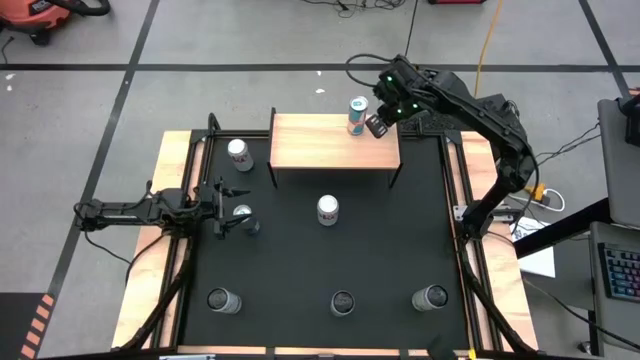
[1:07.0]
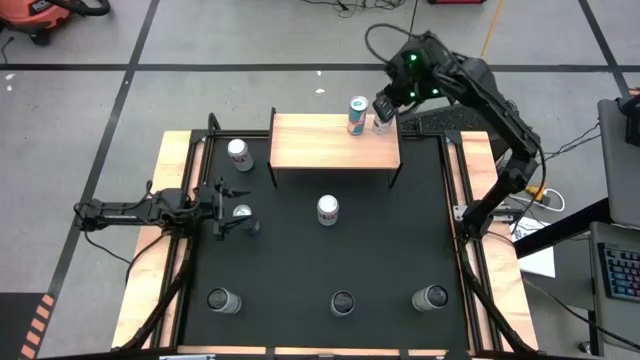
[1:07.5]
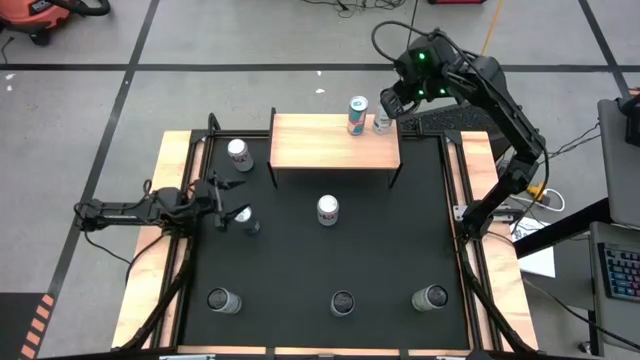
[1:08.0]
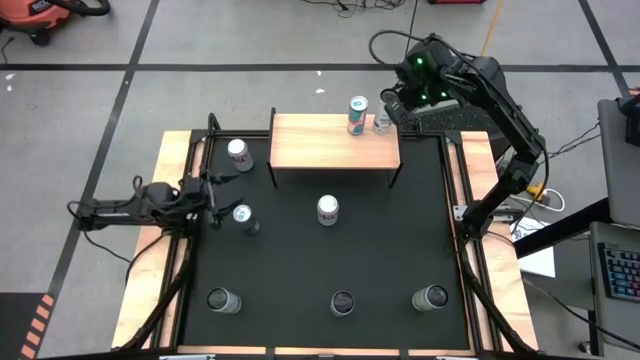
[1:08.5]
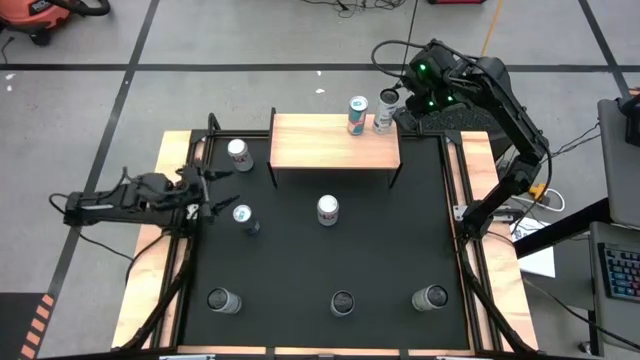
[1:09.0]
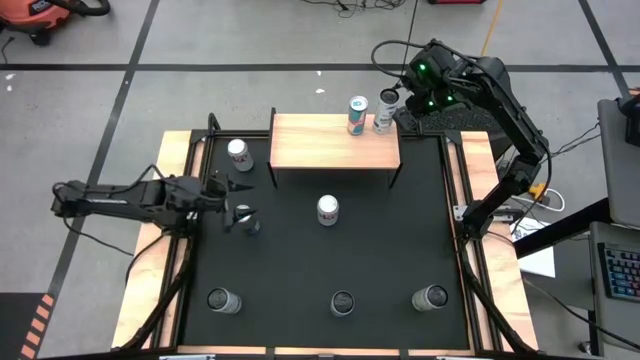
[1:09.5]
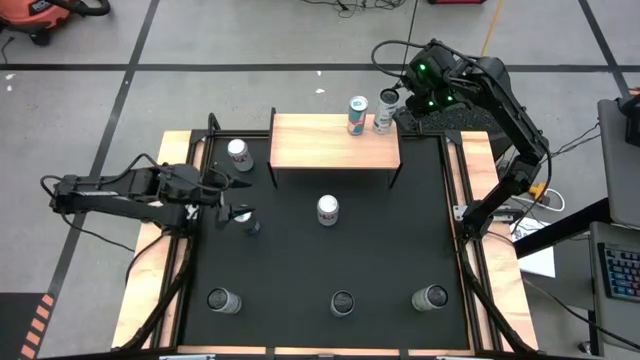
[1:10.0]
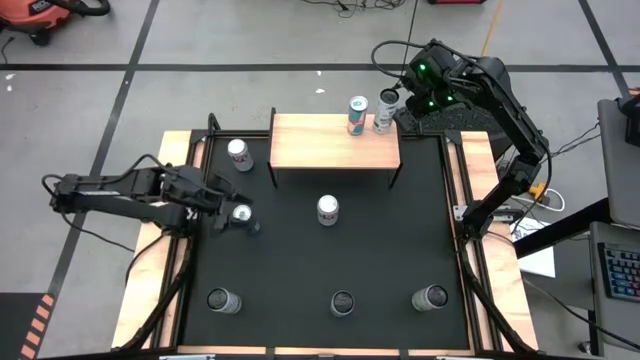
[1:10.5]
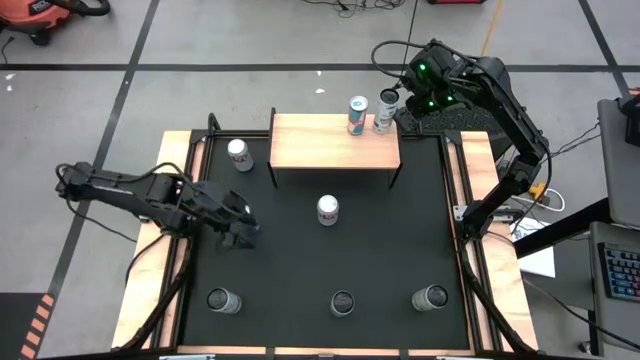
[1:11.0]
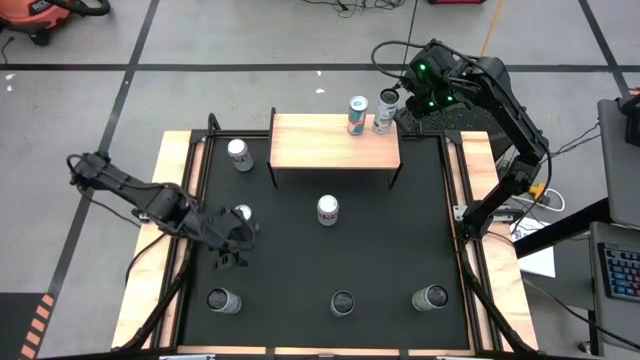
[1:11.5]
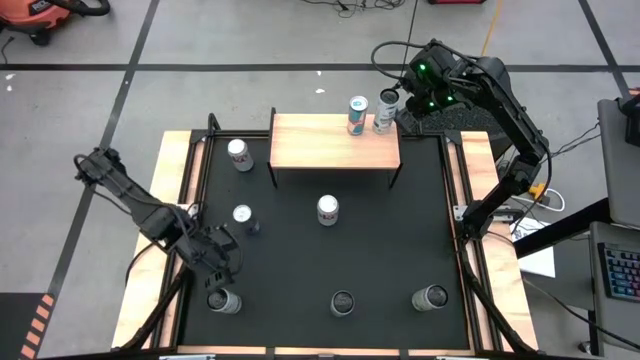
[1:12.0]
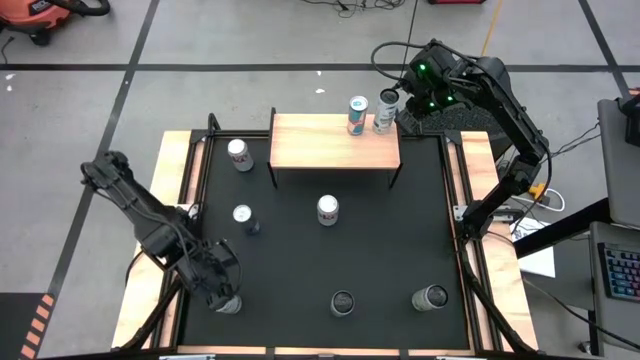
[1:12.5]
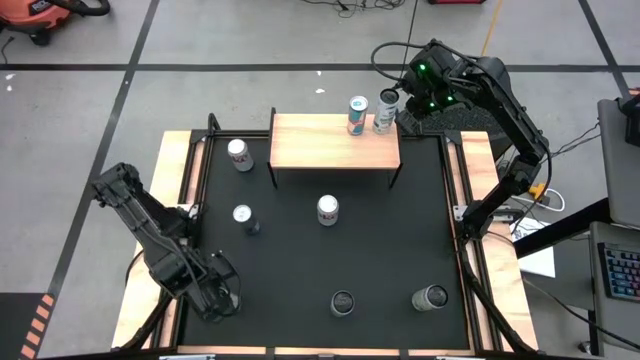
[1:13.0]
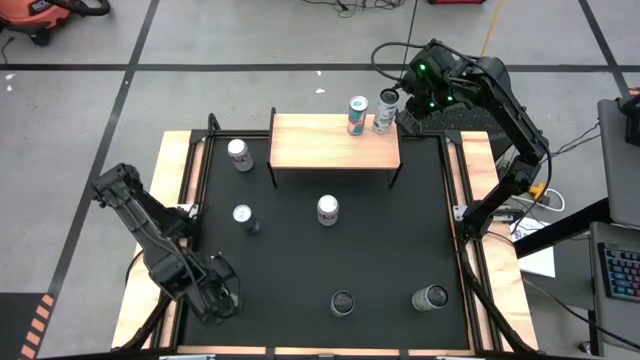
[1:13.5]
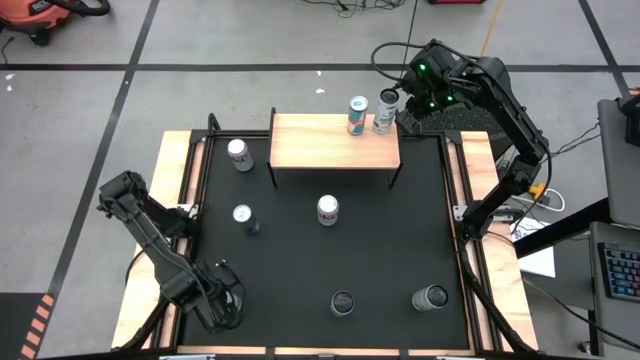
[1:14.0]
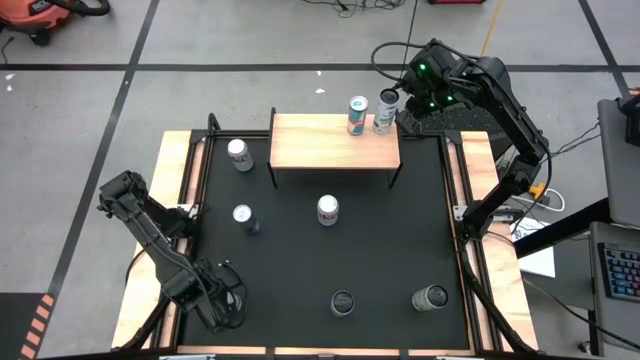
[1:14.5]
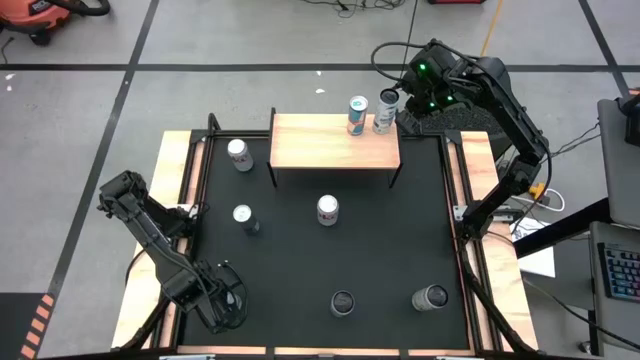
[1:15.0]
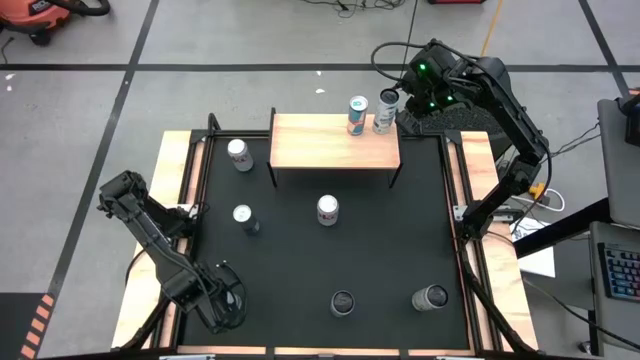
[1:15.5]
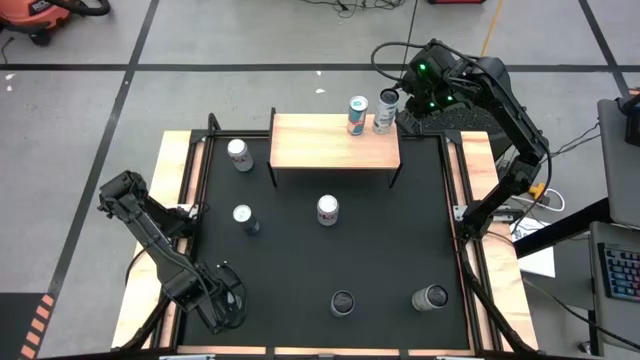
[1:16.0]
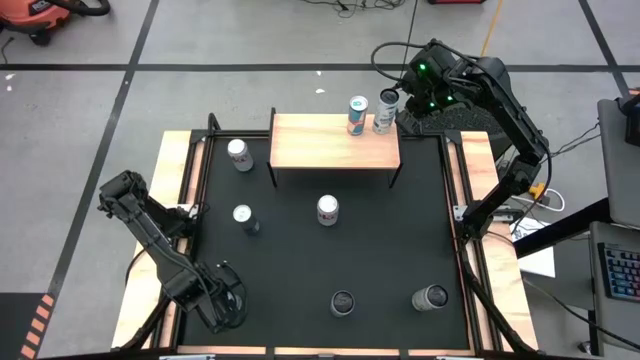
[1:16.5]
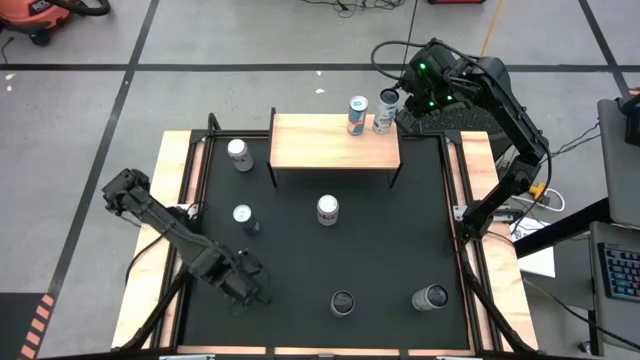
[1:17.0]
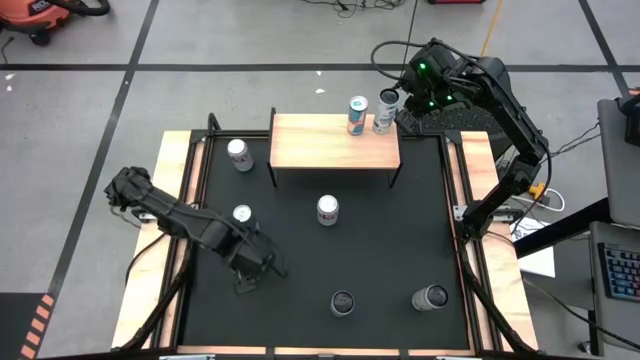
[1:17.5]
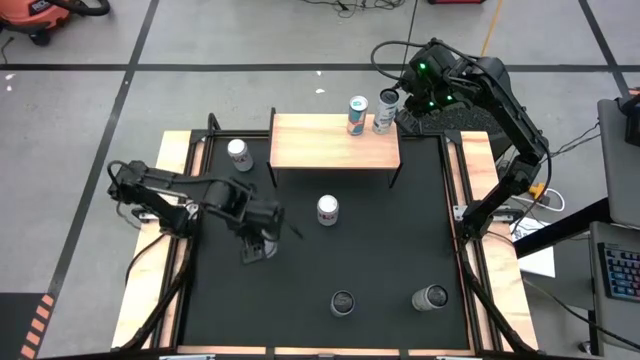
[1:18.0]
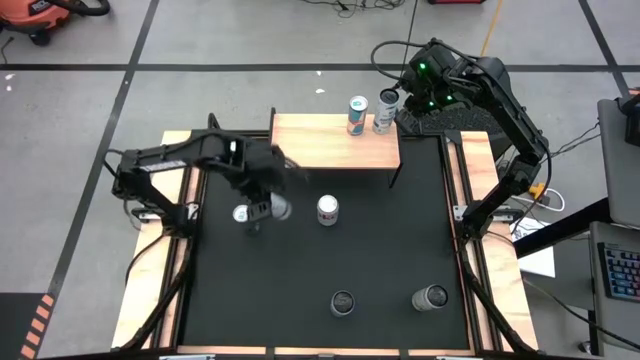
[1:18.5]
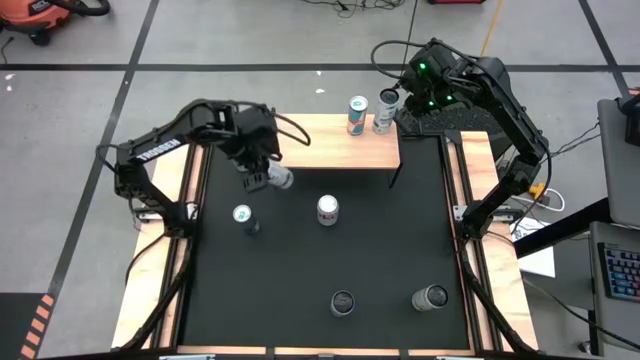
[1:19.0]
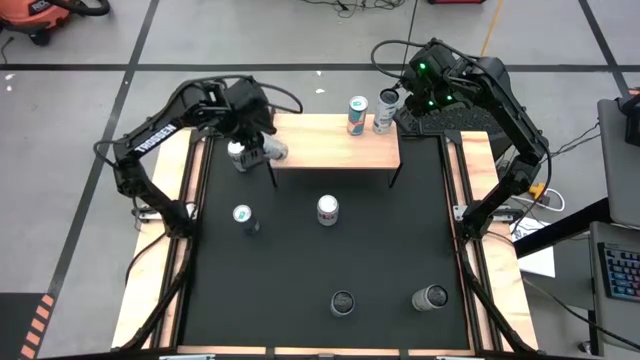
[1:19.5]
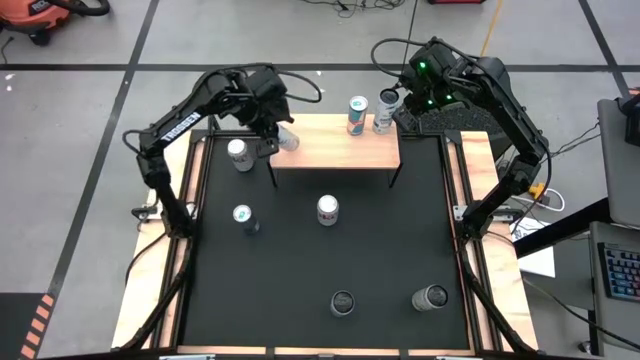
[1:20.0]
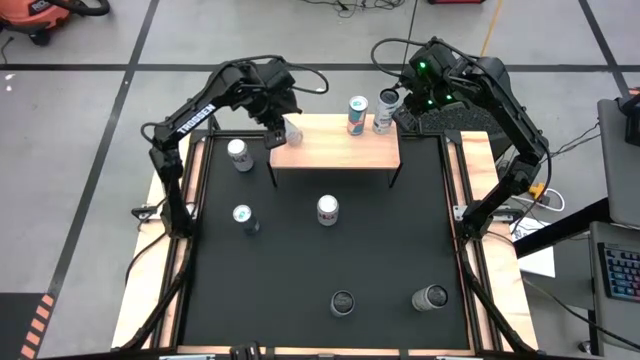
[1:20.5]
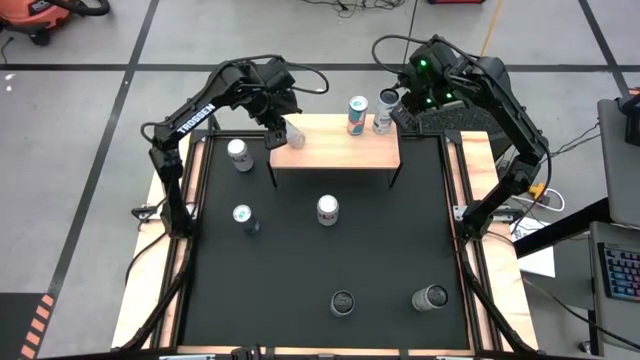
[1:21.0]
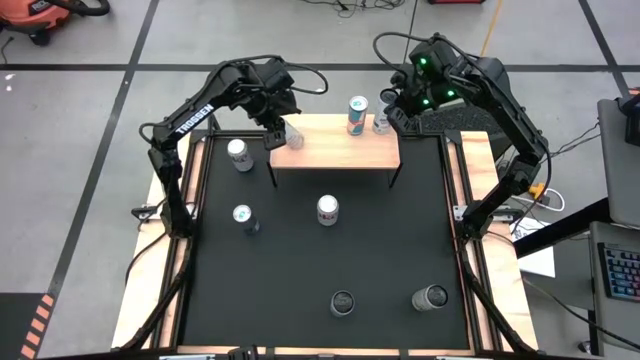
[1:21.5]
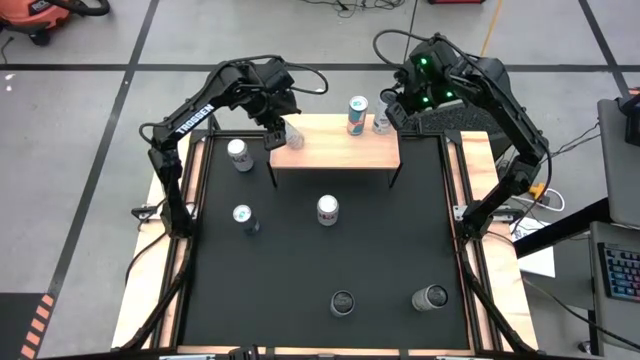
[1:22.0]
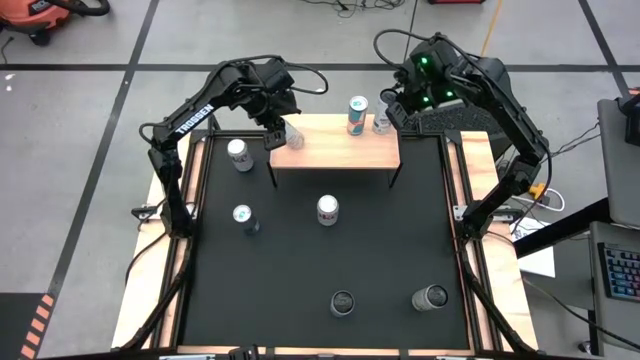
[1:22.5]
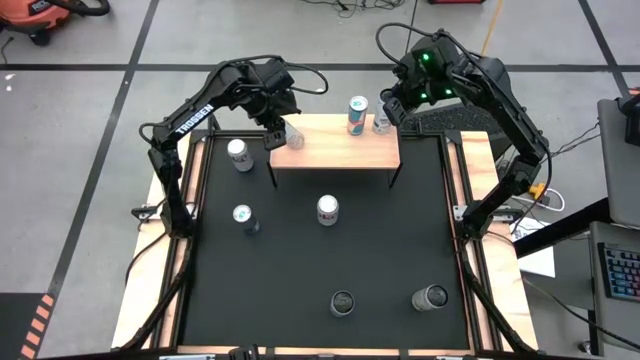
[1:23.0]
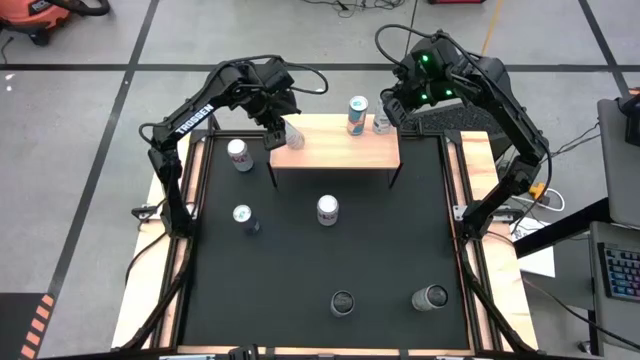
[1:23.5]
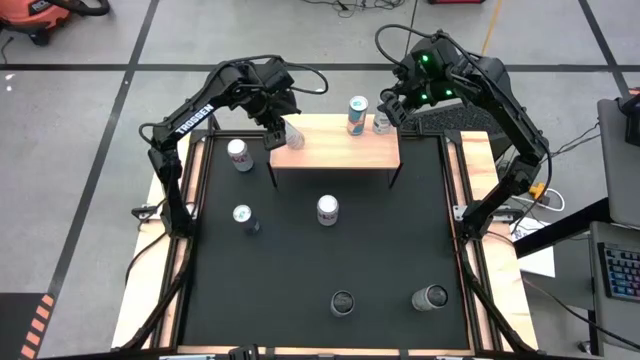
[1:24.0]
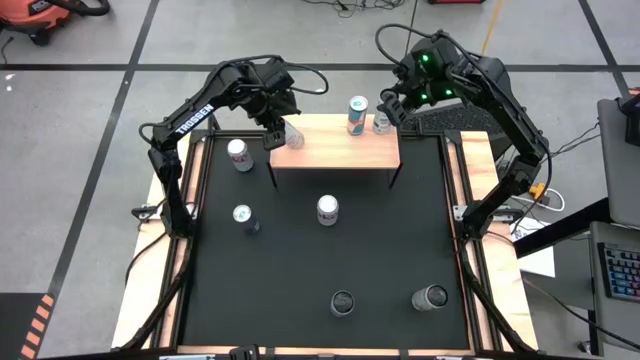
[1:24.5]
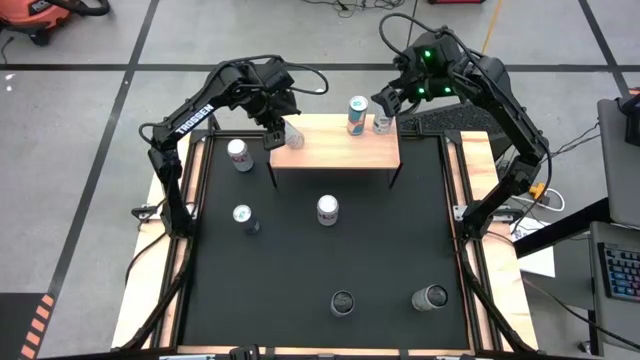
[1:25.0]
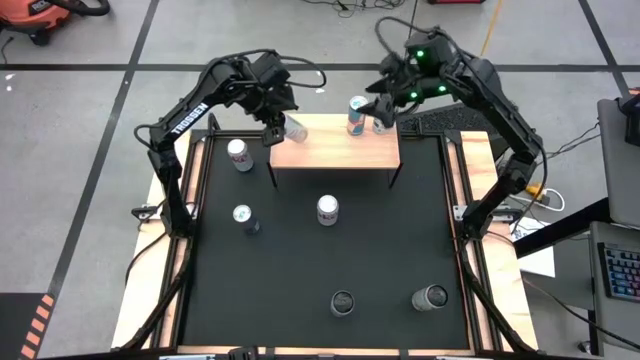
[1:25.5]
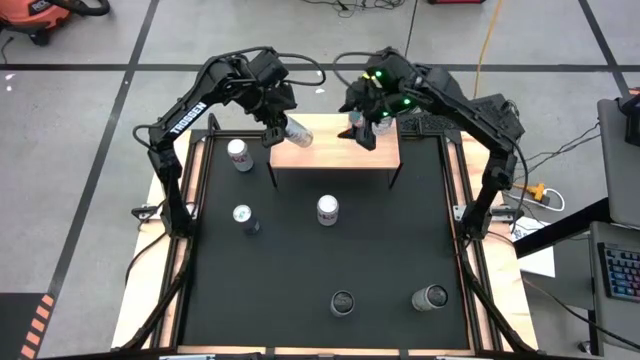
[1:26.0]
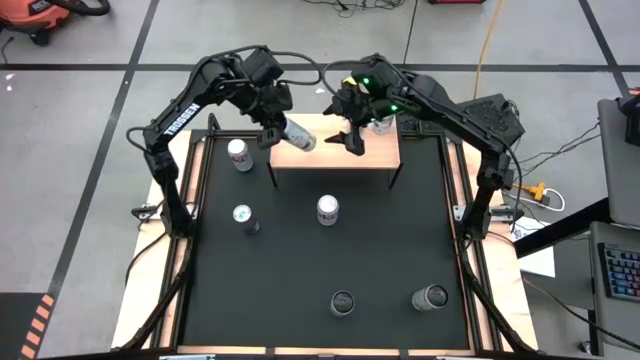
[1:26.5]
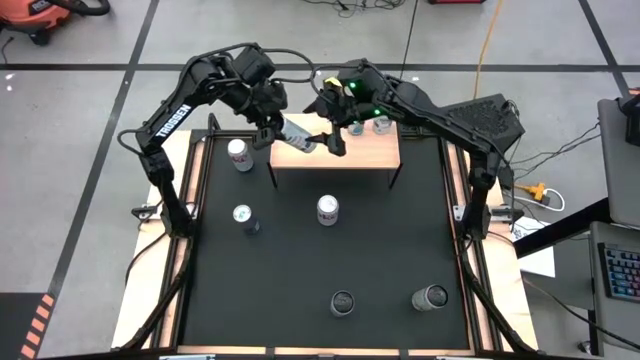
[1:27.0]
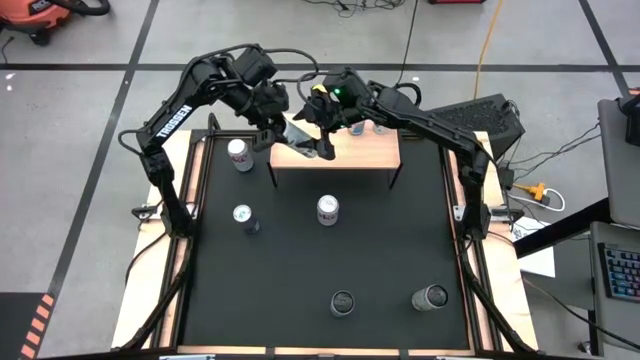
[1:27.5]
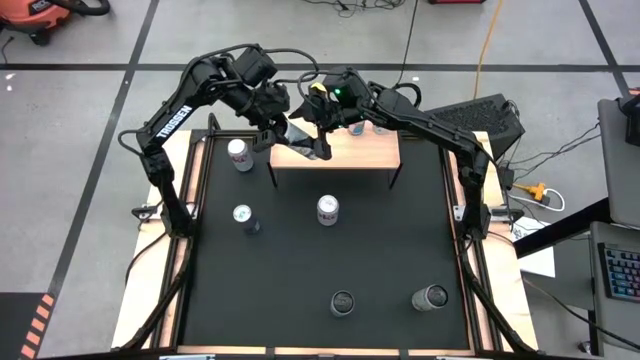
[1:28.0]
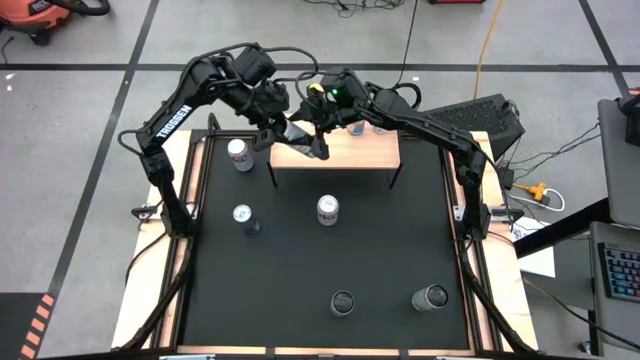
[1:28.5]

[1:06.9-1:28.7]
Task: Place canned beverage on shelf
Put the left white-yellow soda can on the shelf
